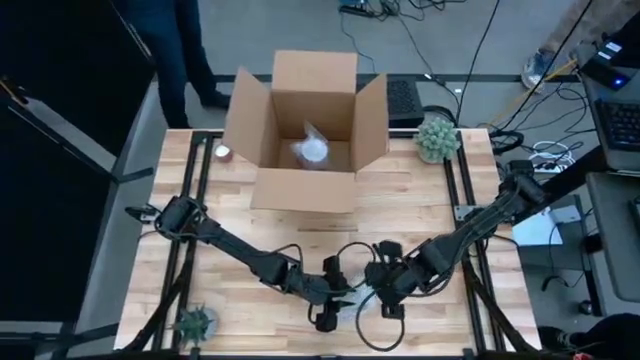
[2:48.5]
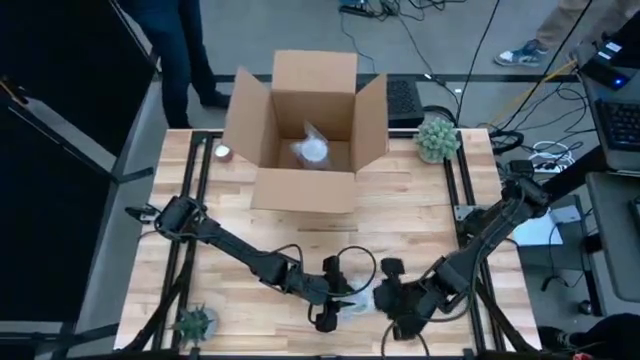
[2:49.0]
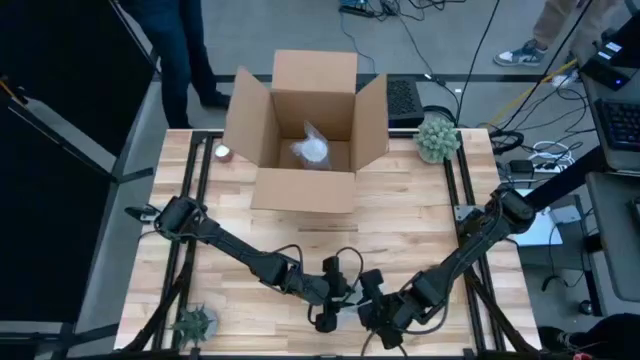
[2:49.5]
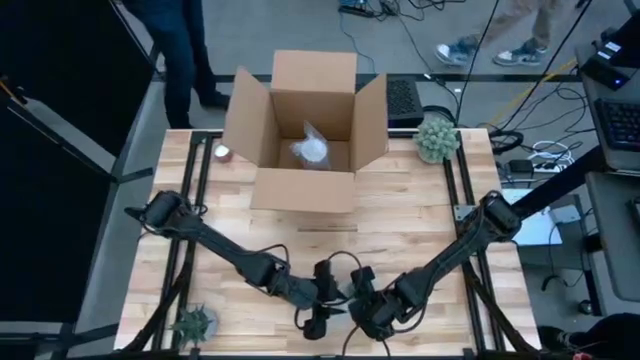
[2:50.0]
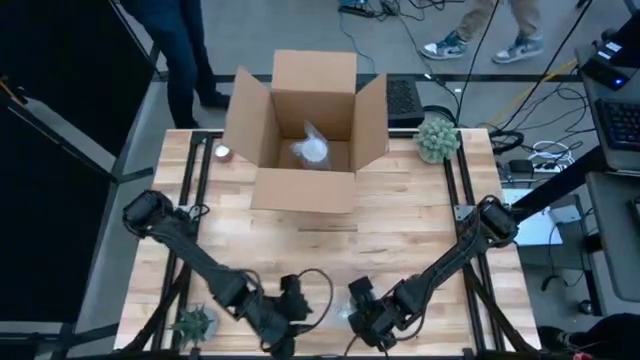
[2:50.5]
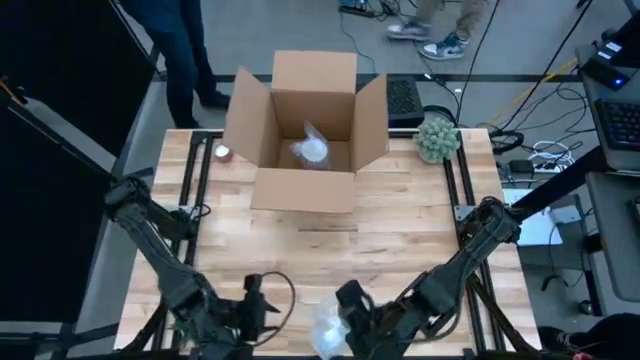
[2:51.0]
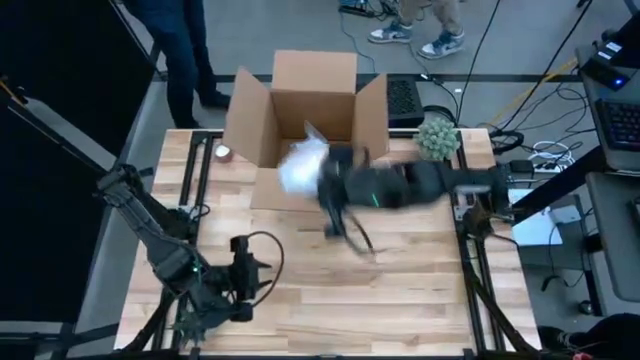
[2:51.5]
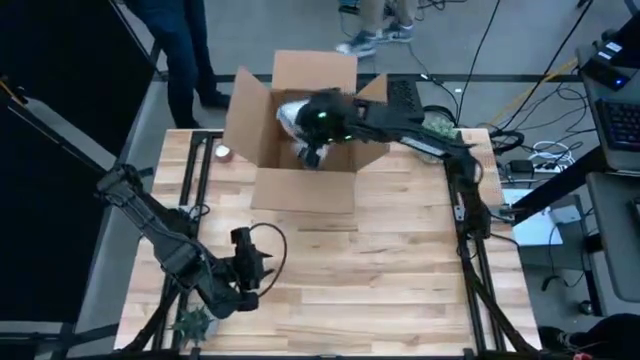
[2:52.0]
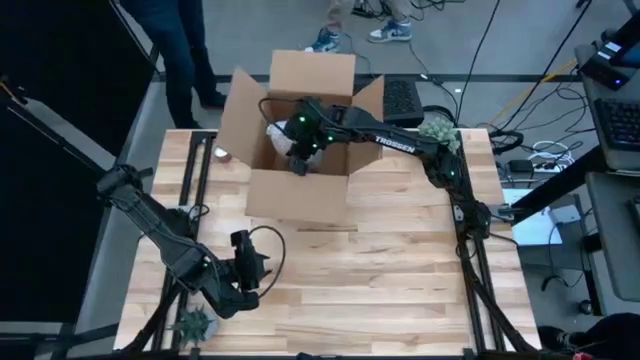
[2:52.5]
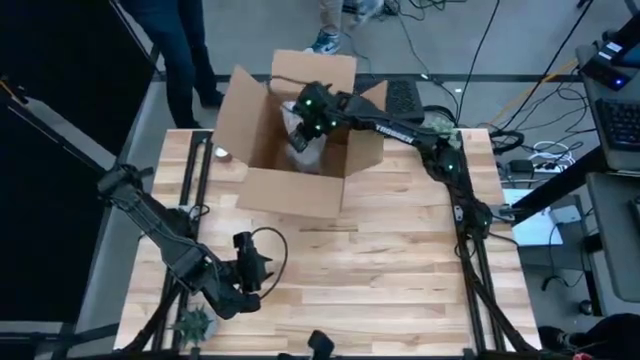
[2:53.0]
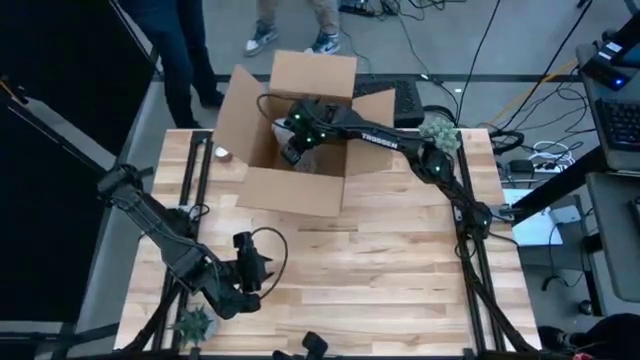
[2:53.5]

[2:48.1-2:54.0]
Task: wrap mug
Put the wrapped orange cup into the cardboard box

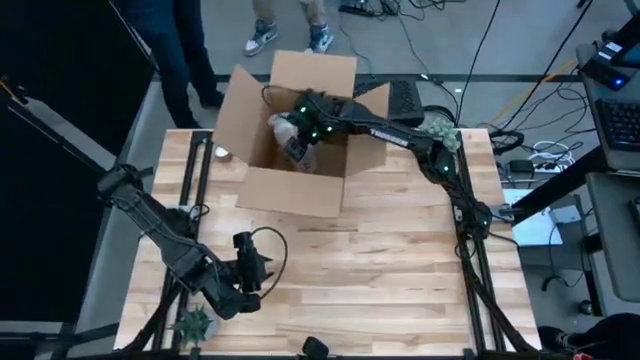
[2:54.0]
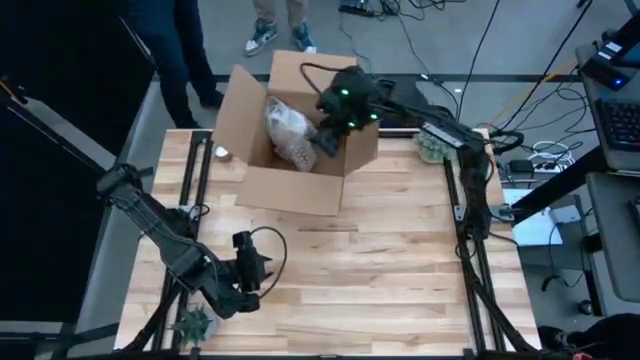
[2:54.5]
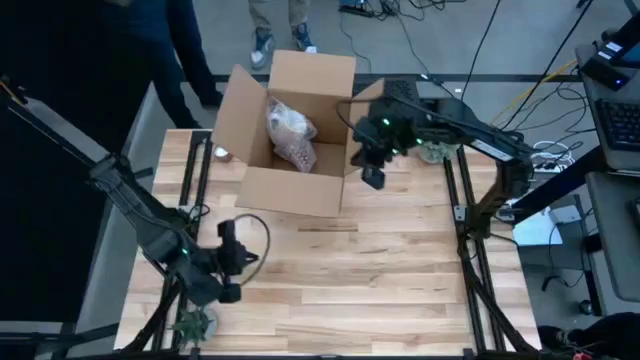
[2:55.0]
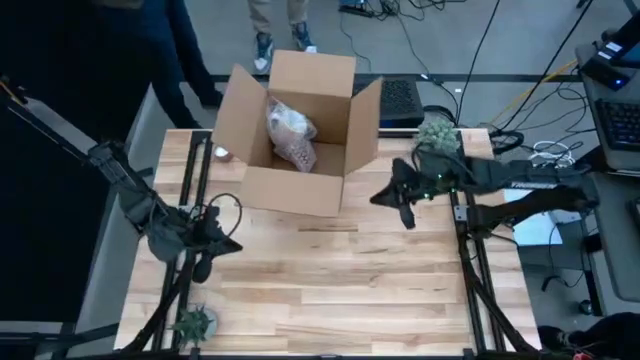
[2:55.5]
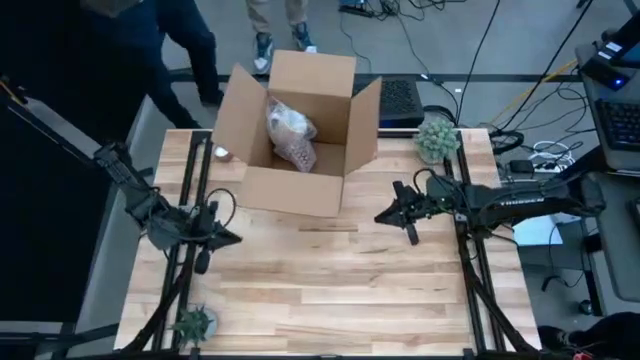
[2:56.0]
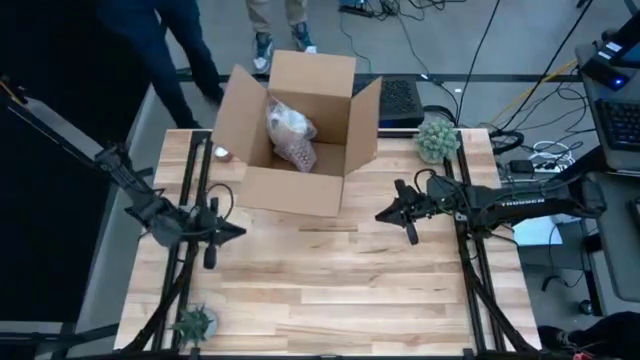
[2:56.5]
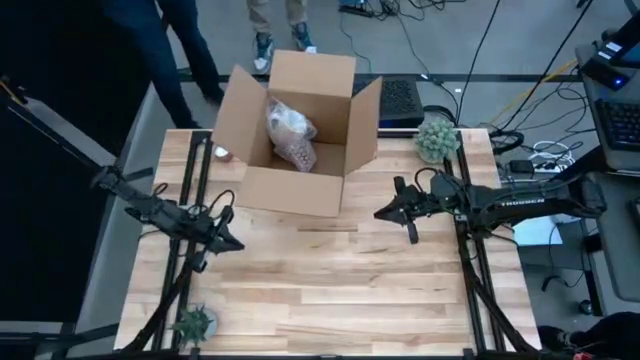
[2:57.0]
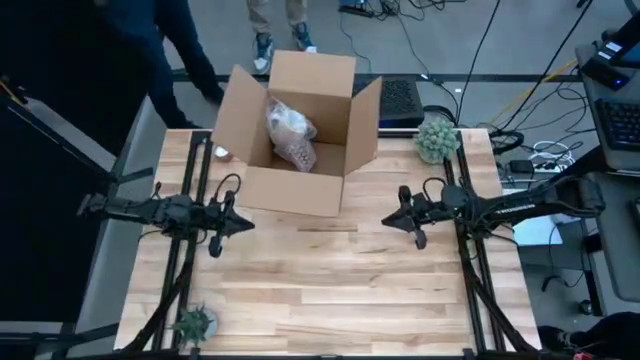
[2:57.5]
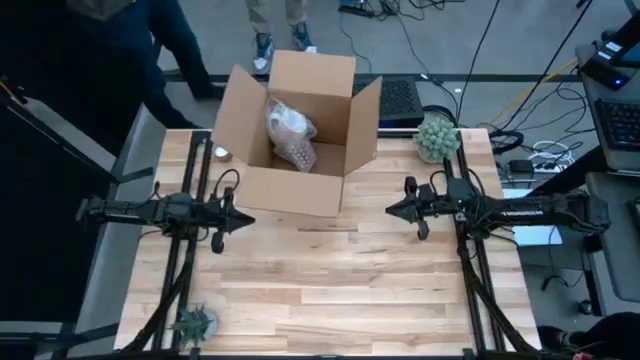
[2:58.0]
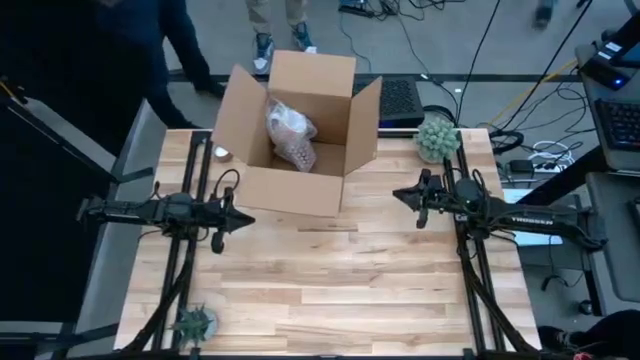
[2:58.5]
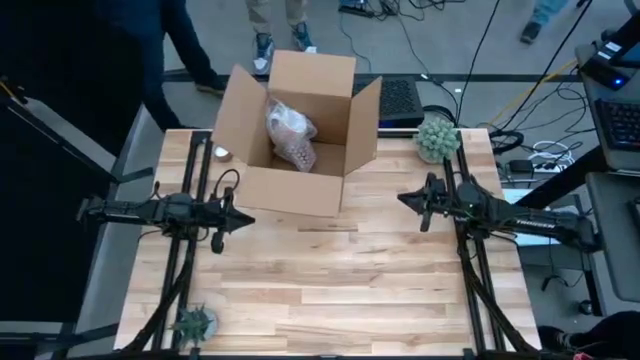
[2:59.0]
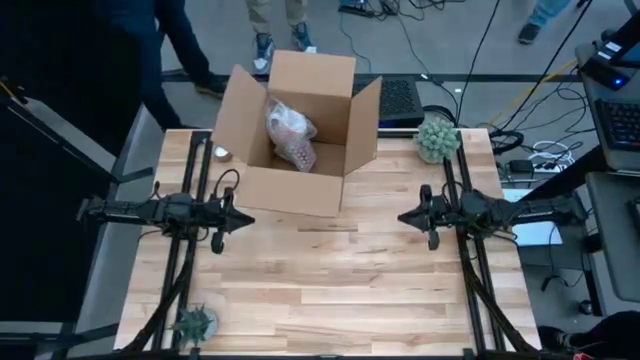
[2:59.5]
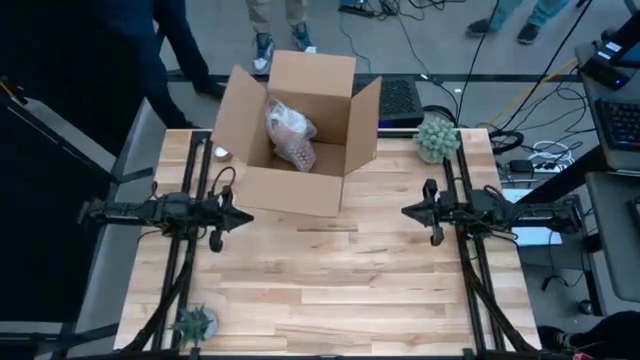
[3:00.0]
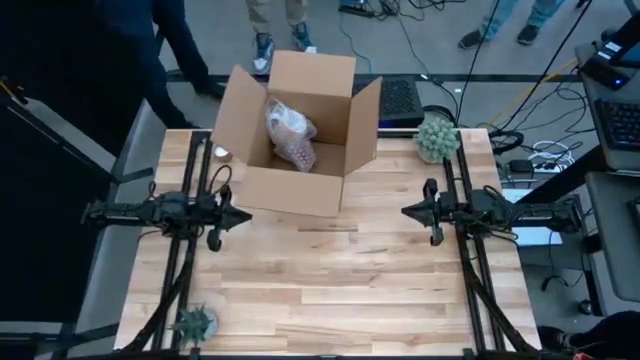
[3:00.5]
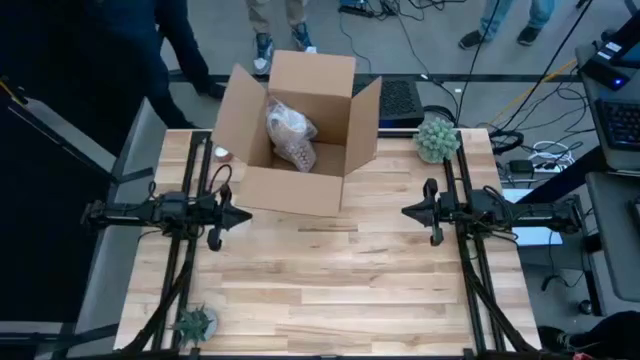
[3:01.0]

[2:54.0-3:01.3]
Return to Home Position

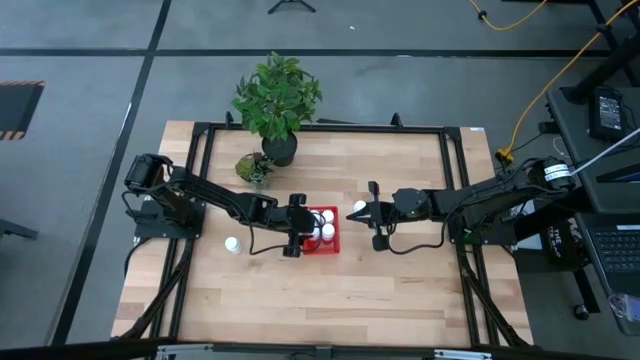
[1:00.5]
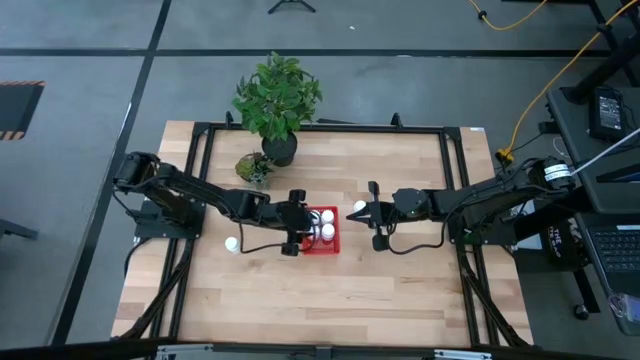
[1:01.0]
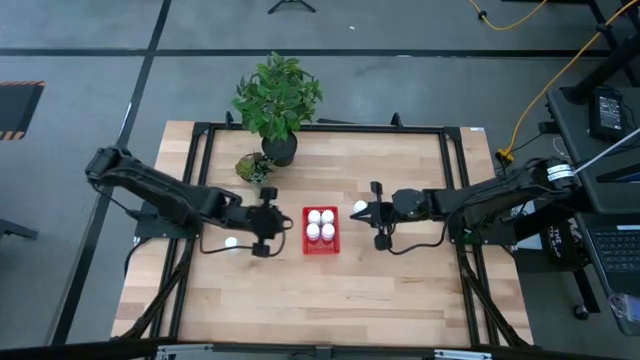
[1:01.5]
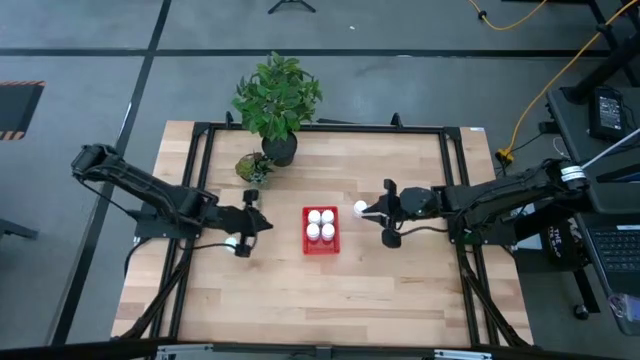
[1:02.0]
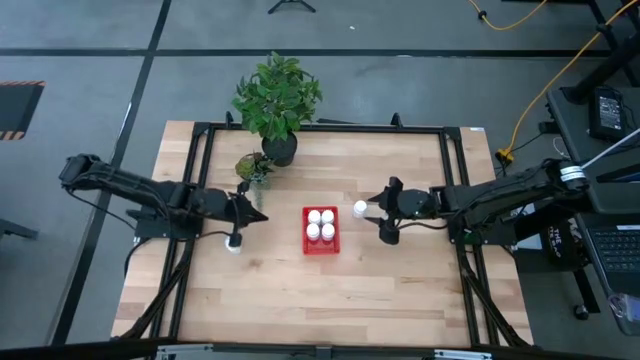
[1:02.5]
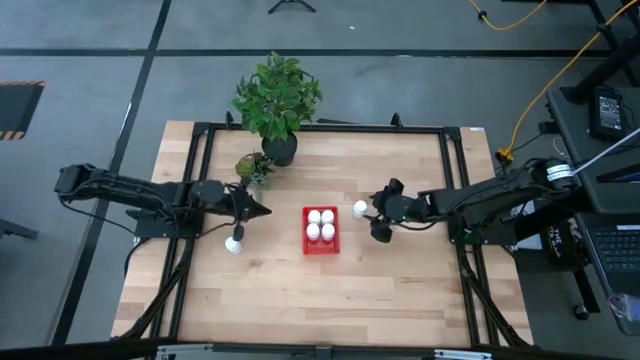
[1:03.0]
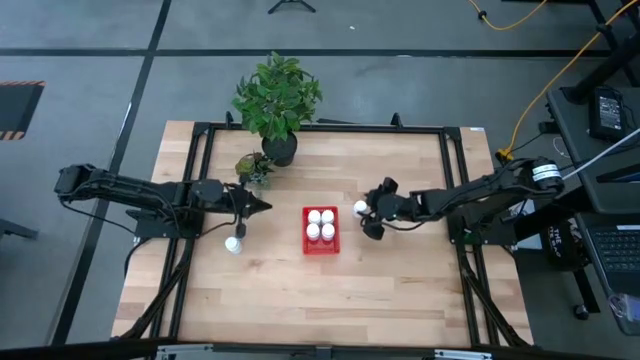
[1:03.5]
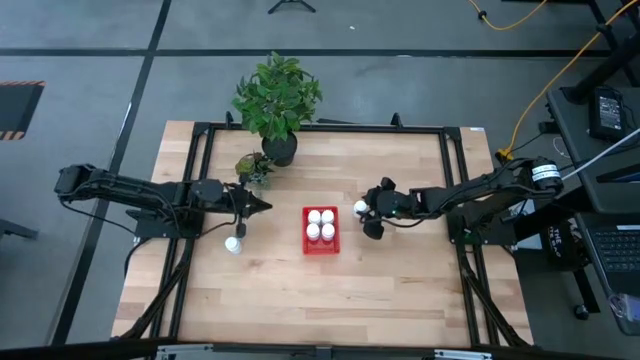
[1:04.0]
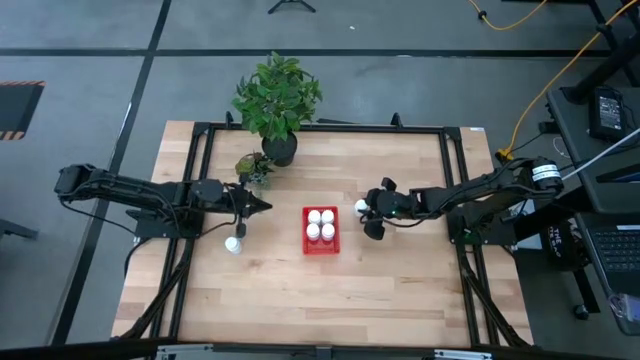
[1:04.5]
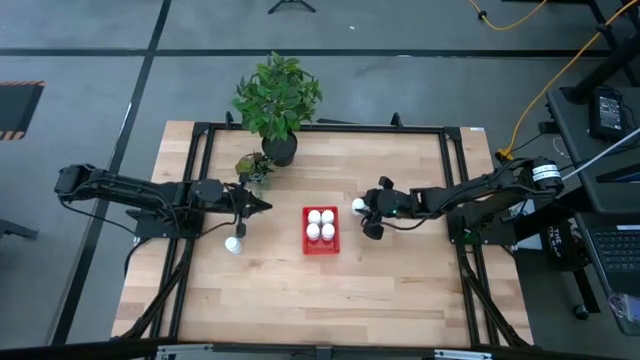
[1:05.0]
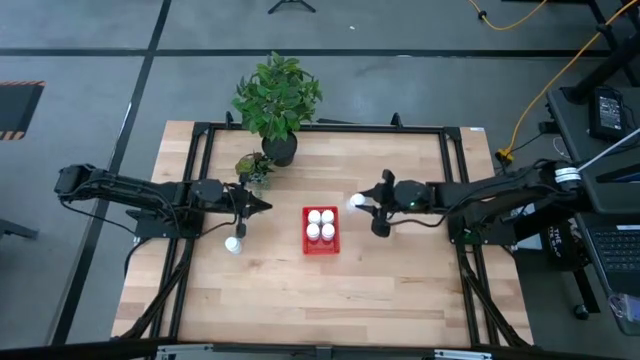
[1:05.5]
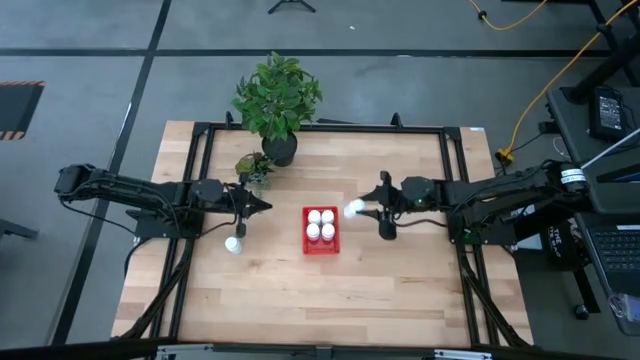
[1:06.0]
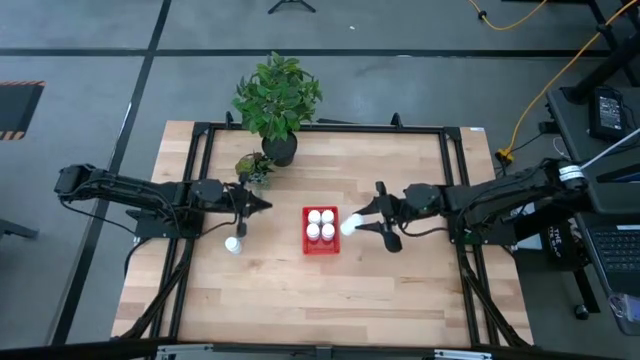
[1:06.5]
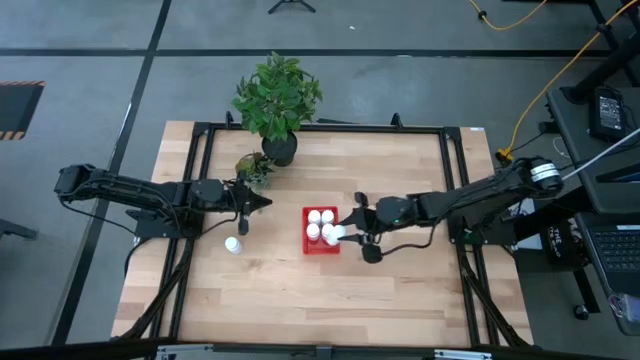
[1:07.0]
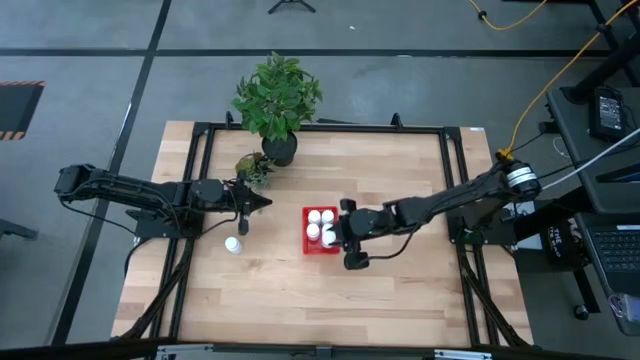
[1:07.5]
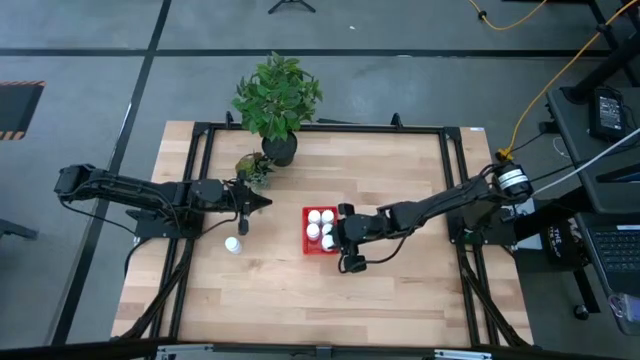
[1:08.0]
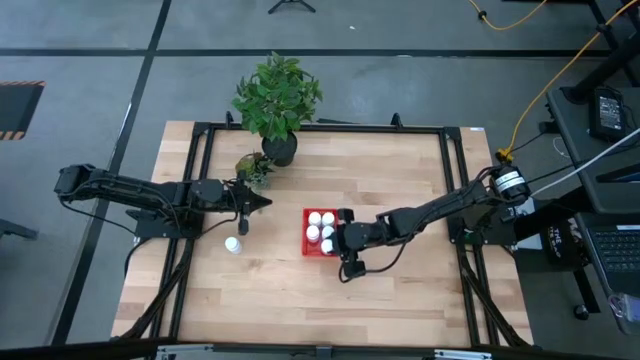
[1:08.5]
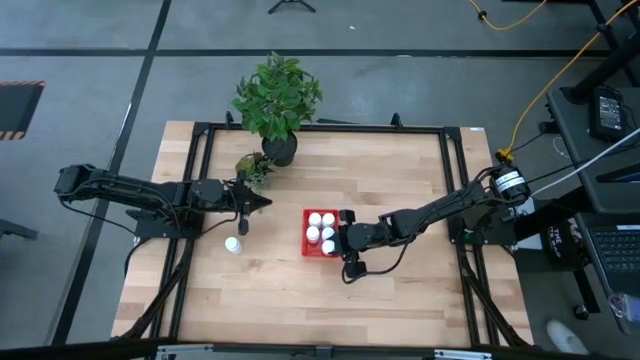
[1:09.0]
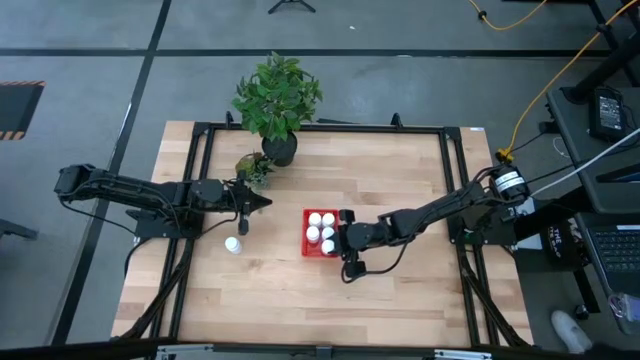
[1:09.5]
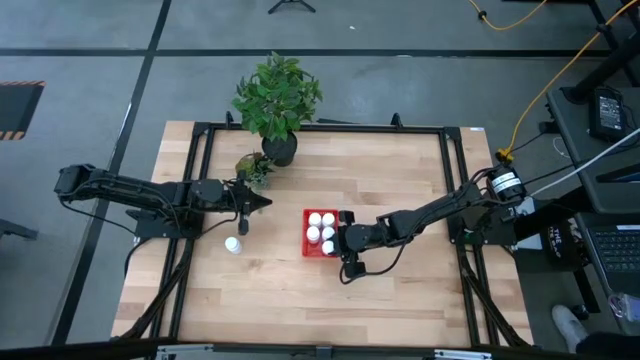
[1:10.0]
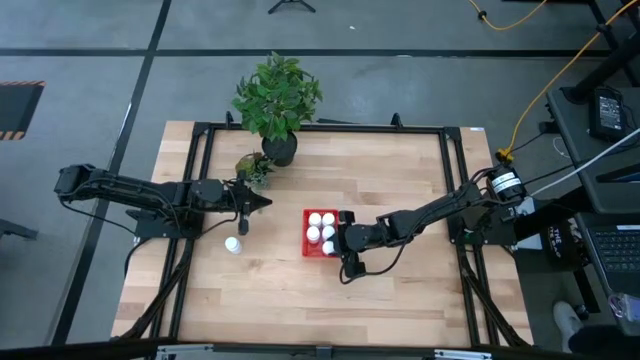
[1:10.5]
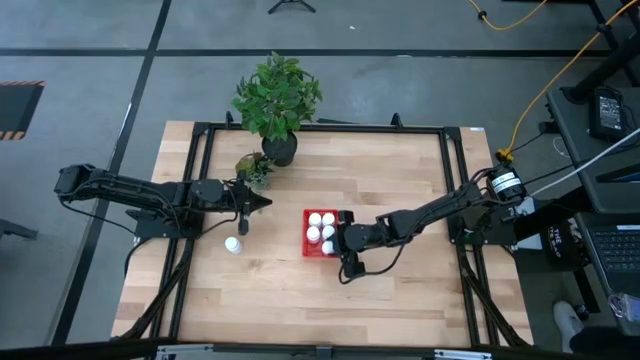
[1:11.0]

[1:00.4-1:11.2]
Task: Pick and place pill bottles into a basket
Put the white medicine bottle into the red bin
